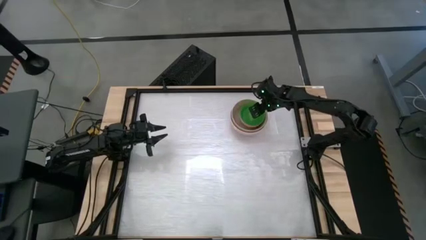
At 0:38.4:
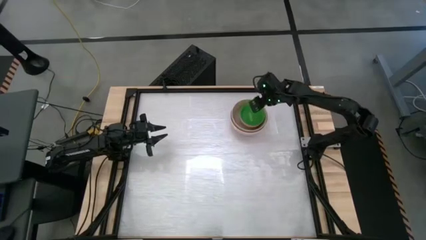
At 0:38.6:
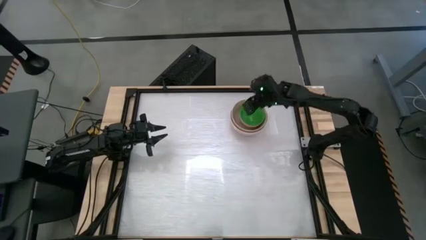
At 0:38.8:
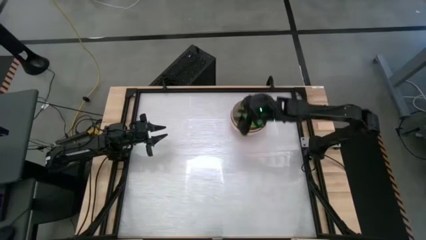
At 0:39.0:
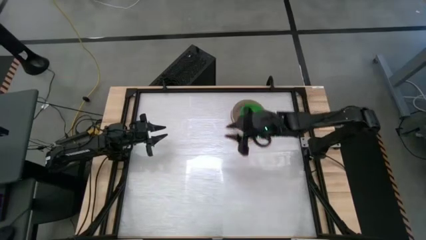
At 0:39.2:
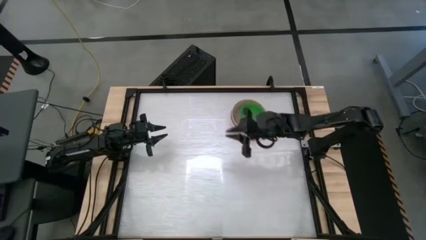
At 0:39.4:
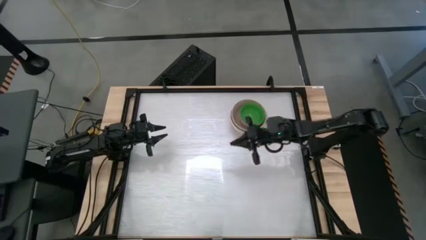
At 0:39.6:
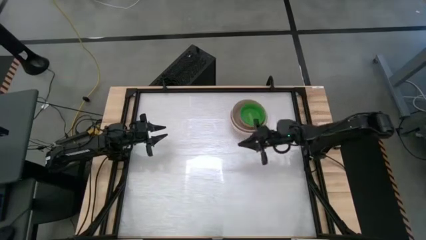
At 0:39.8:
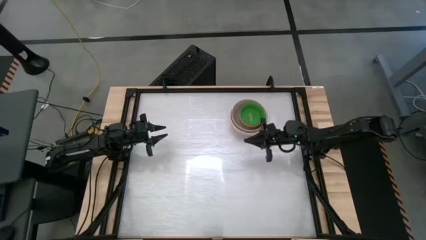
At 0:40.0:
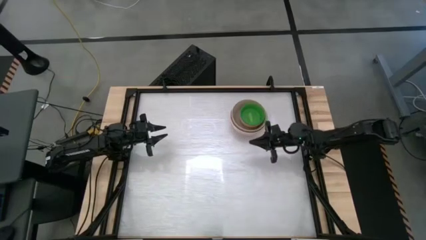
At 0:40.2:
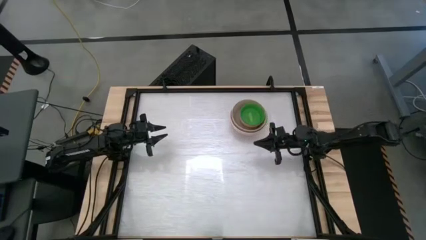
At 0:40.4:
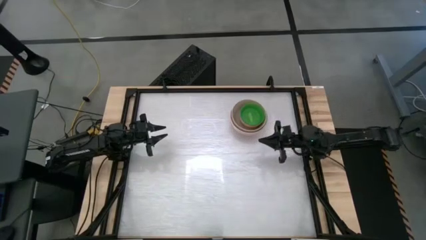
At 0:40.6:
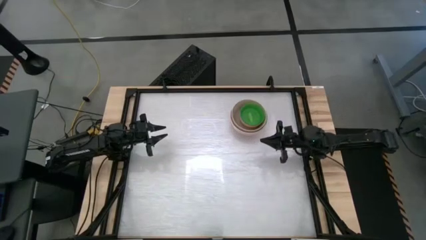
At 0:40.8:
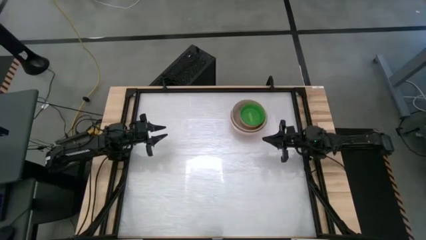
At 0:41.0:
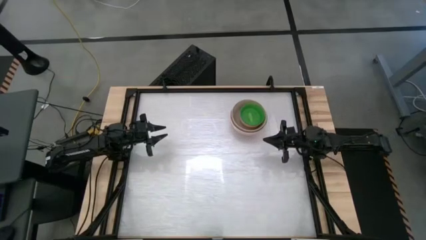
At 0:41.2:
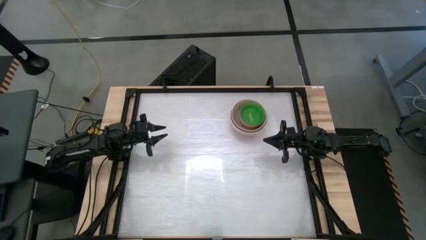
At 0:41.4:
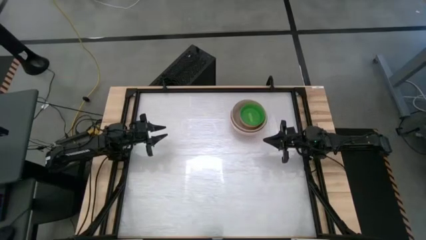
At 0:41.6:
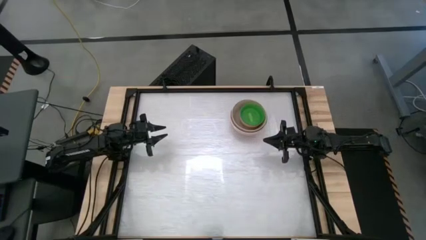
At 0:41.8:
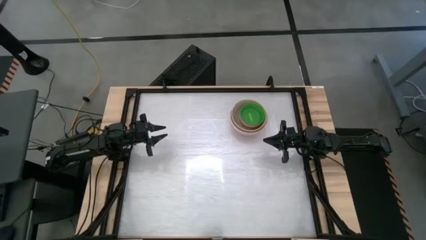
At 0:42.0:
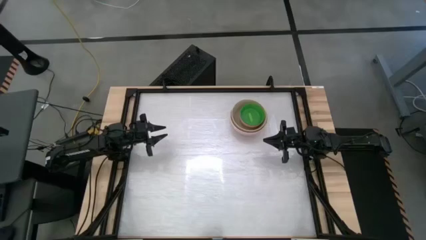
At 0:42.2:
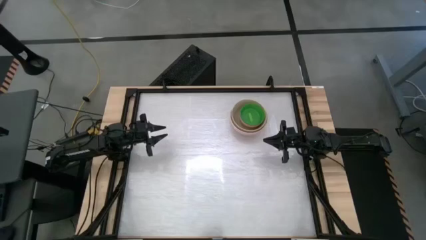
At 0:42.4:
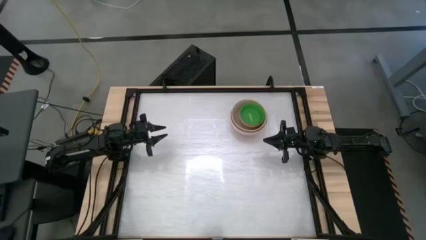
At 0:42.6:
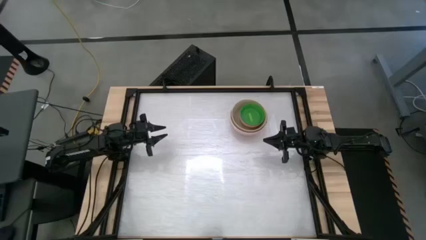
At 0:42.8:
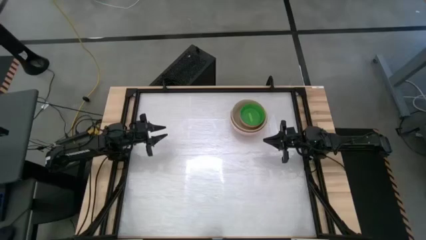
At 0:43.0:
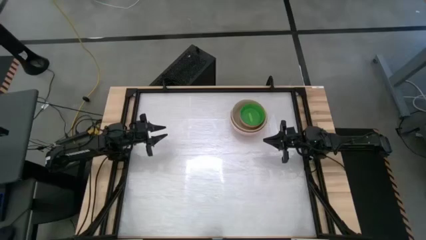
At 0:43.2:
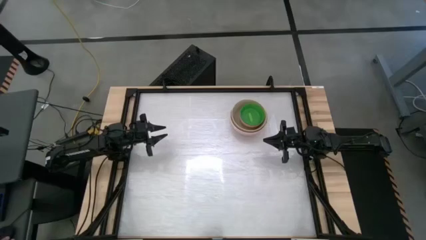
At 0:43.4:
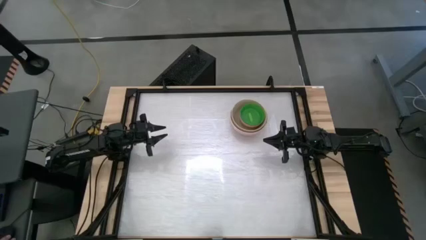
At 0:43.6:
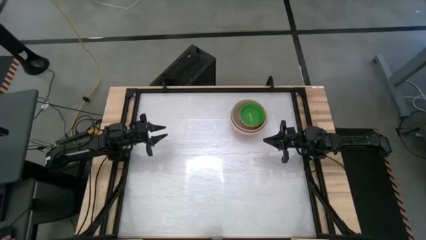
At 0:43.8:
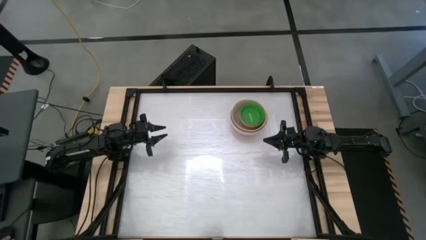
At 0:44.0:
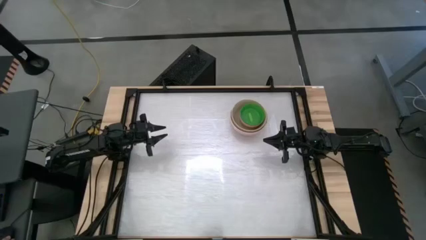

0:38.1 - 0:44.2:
Return to Home Position
